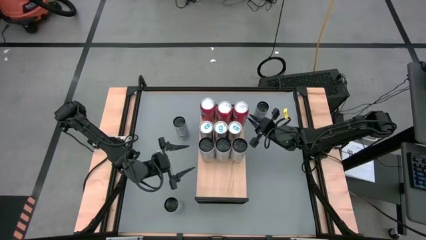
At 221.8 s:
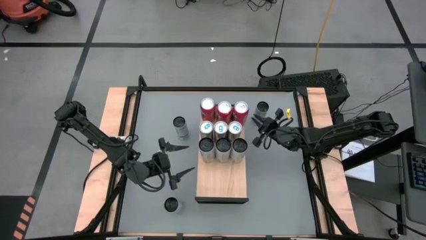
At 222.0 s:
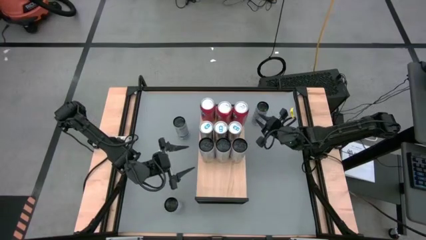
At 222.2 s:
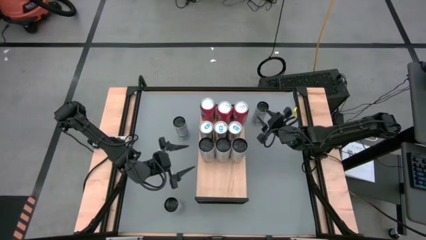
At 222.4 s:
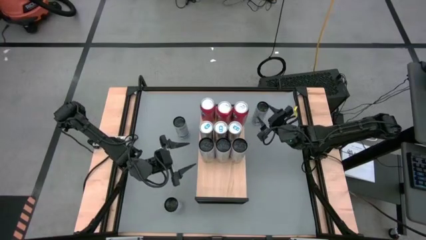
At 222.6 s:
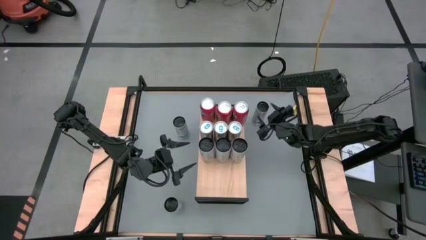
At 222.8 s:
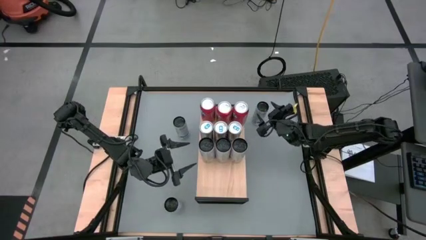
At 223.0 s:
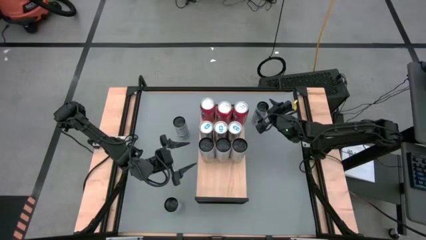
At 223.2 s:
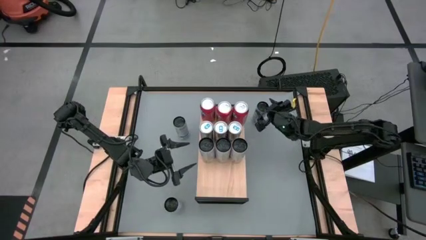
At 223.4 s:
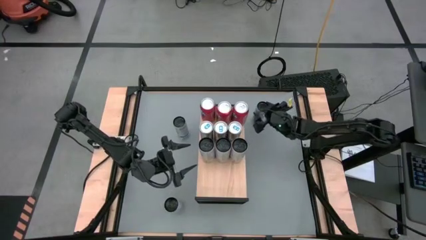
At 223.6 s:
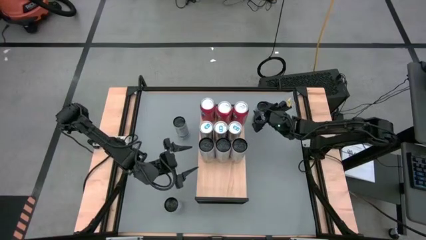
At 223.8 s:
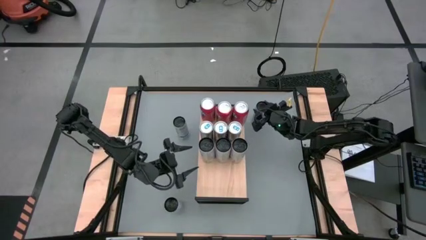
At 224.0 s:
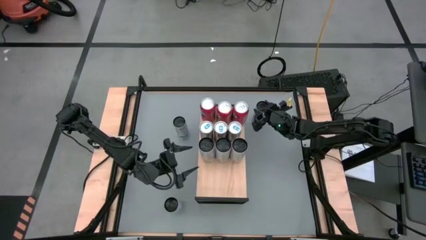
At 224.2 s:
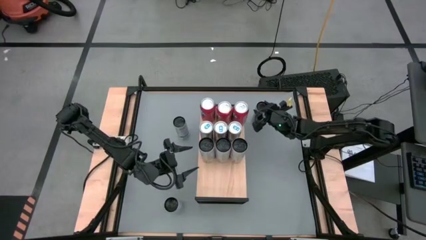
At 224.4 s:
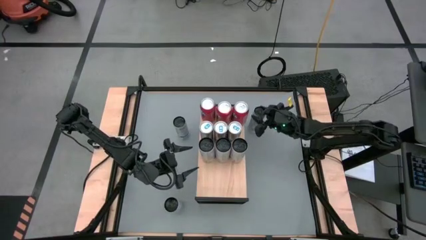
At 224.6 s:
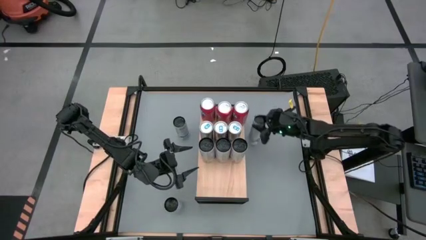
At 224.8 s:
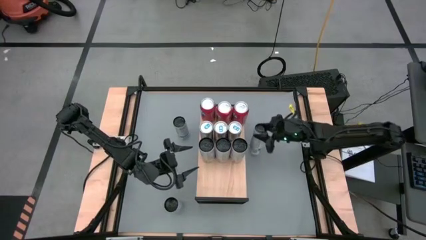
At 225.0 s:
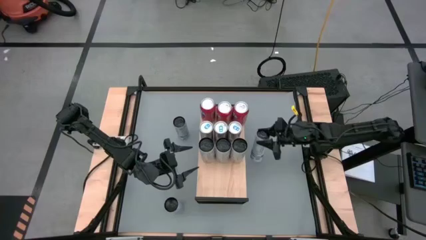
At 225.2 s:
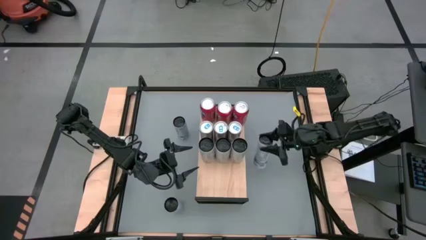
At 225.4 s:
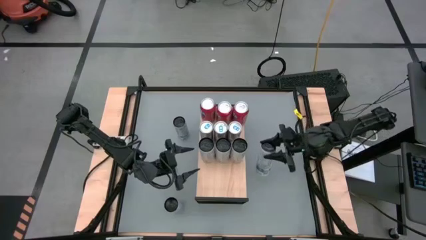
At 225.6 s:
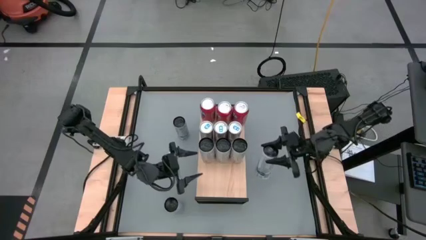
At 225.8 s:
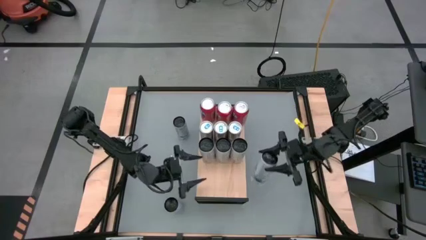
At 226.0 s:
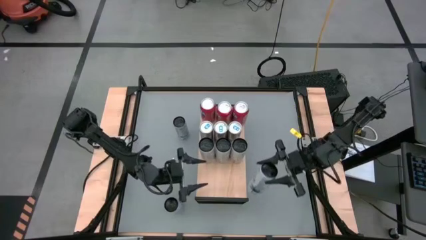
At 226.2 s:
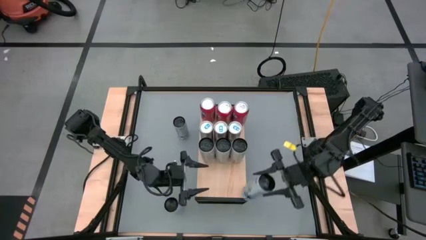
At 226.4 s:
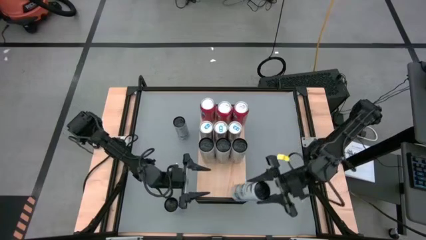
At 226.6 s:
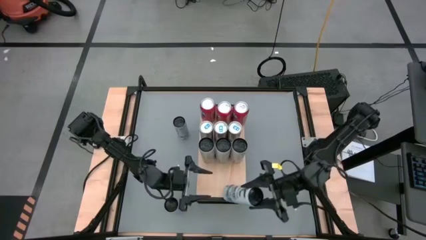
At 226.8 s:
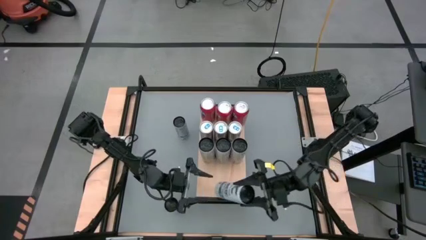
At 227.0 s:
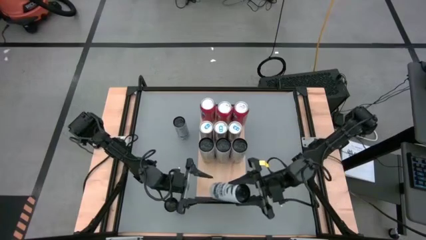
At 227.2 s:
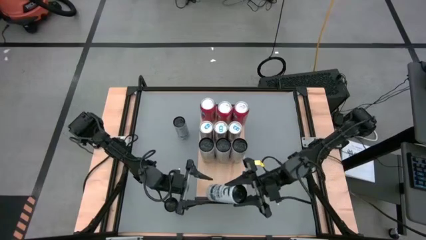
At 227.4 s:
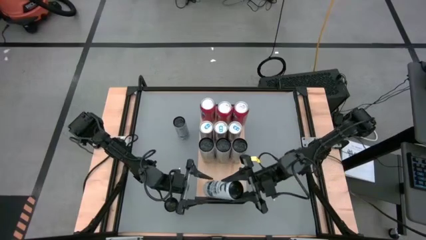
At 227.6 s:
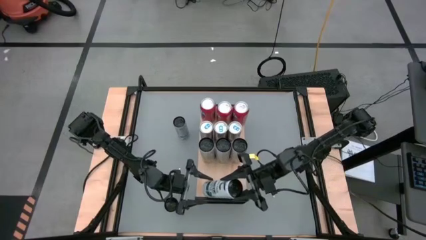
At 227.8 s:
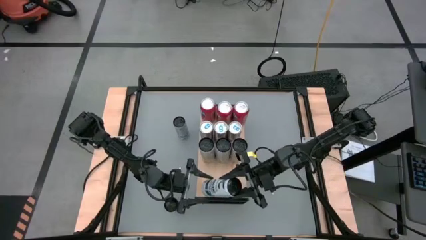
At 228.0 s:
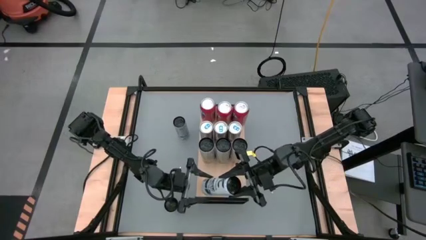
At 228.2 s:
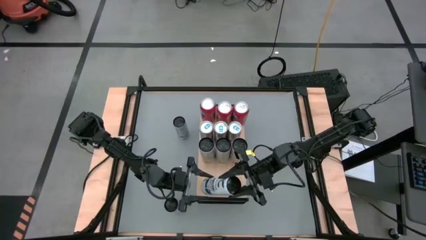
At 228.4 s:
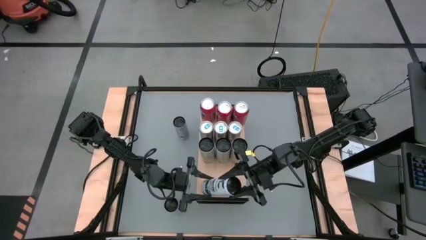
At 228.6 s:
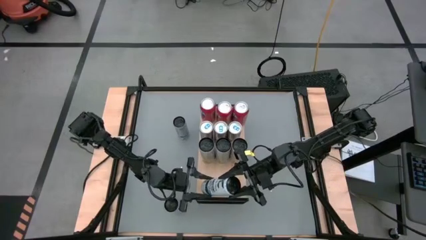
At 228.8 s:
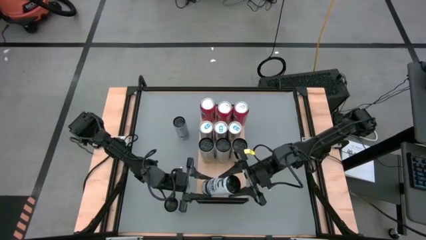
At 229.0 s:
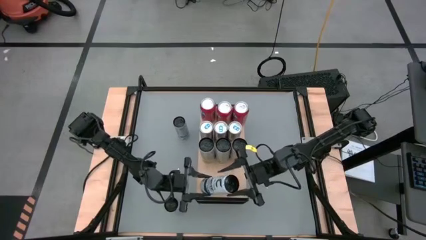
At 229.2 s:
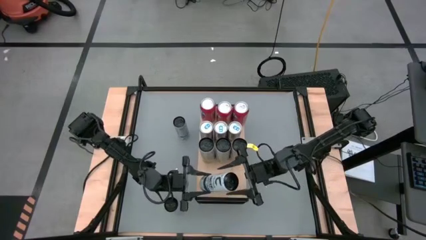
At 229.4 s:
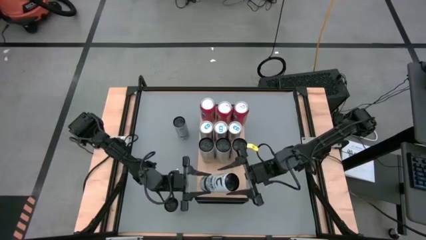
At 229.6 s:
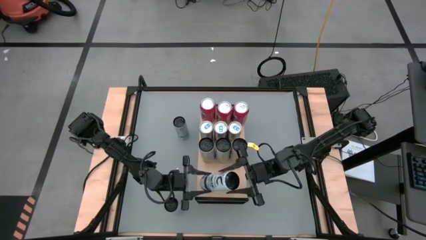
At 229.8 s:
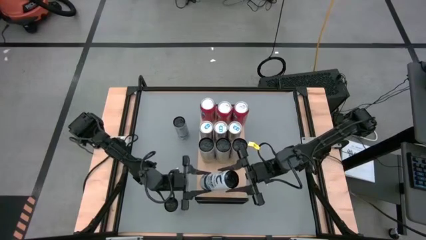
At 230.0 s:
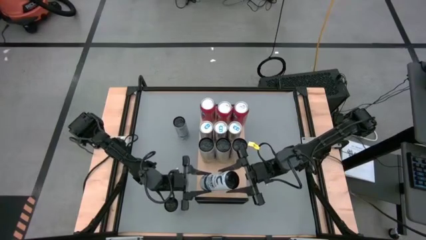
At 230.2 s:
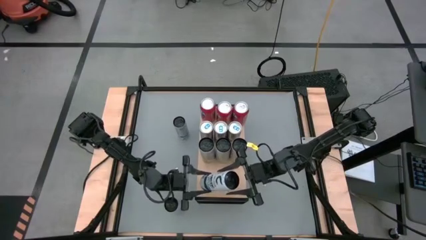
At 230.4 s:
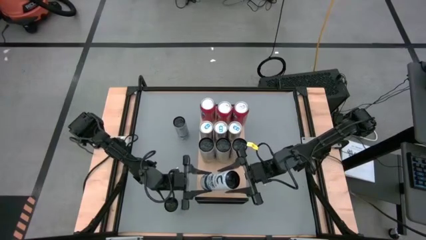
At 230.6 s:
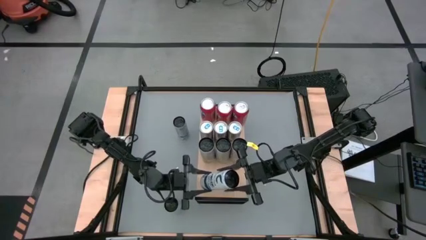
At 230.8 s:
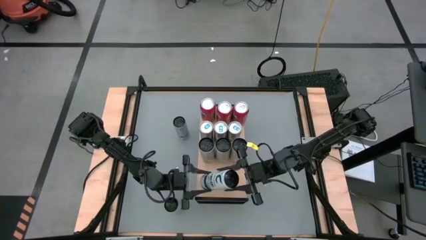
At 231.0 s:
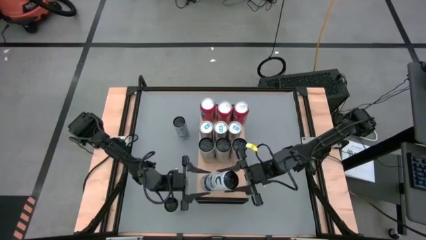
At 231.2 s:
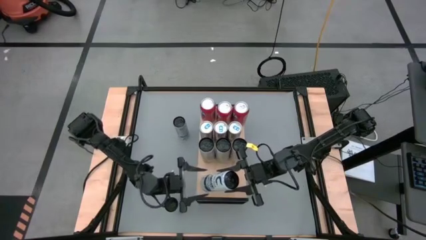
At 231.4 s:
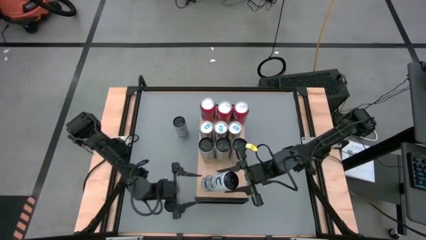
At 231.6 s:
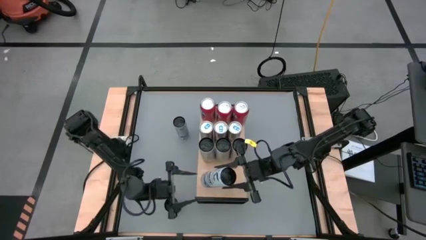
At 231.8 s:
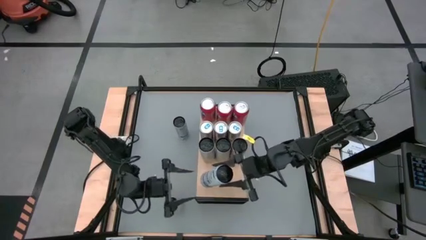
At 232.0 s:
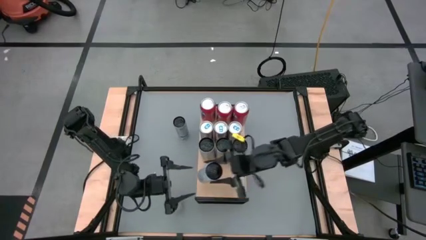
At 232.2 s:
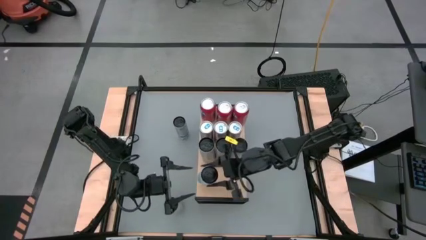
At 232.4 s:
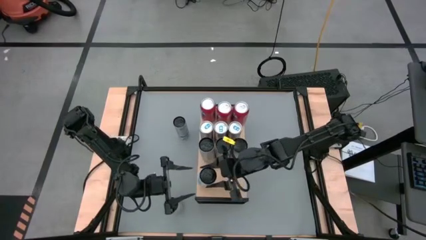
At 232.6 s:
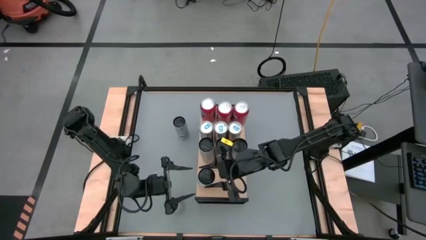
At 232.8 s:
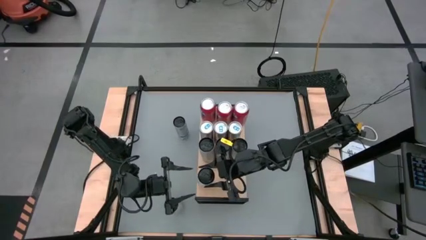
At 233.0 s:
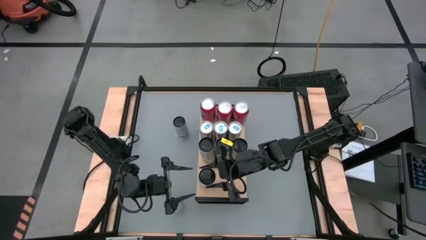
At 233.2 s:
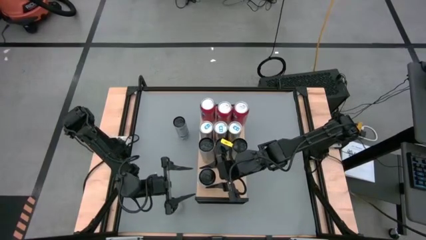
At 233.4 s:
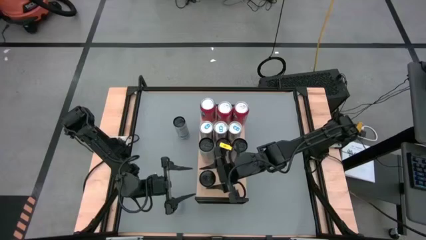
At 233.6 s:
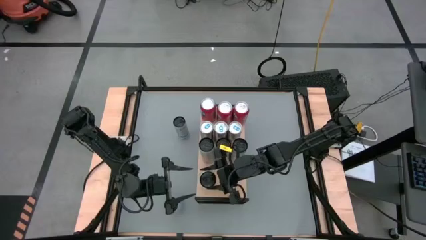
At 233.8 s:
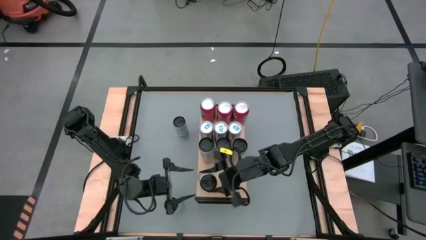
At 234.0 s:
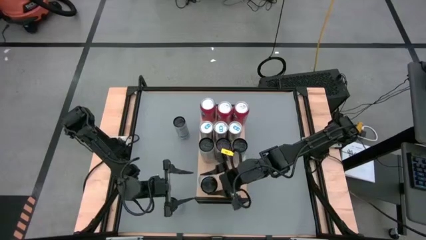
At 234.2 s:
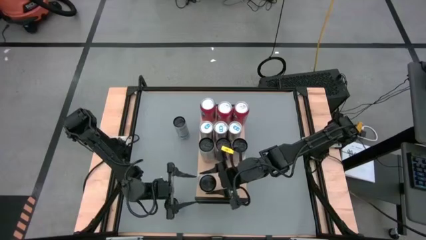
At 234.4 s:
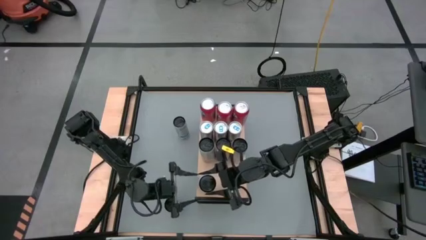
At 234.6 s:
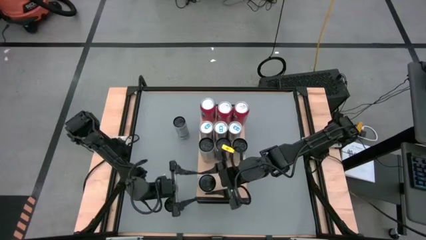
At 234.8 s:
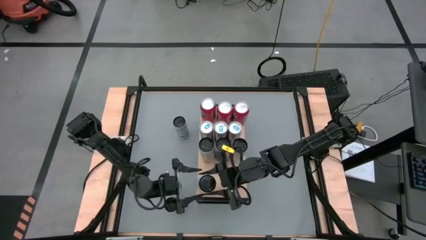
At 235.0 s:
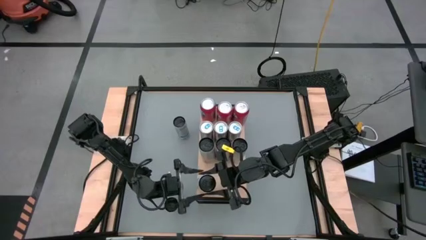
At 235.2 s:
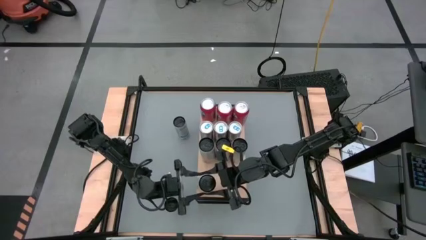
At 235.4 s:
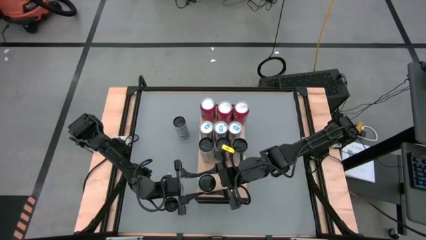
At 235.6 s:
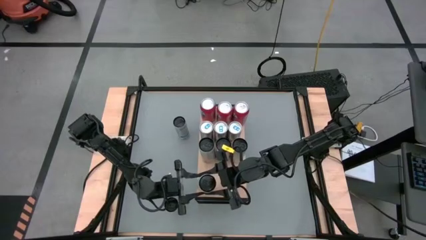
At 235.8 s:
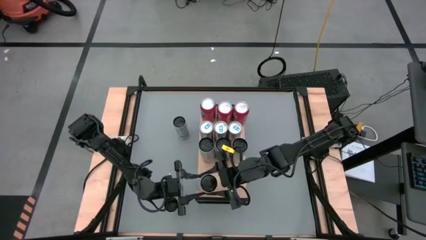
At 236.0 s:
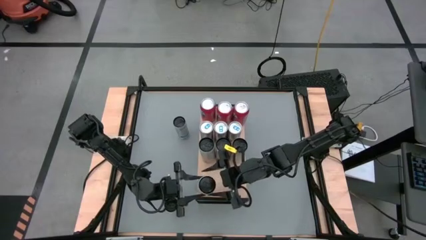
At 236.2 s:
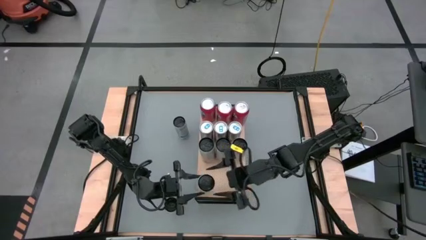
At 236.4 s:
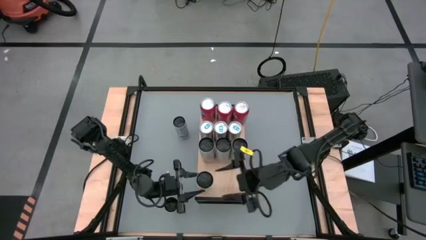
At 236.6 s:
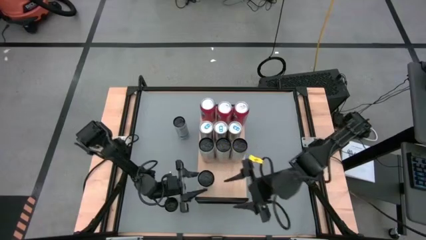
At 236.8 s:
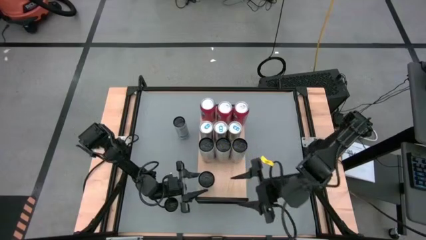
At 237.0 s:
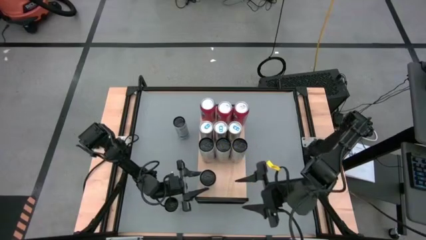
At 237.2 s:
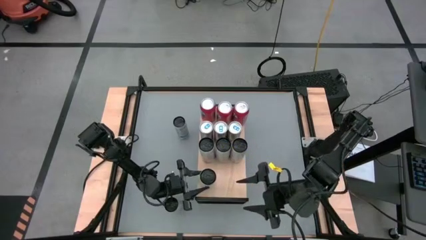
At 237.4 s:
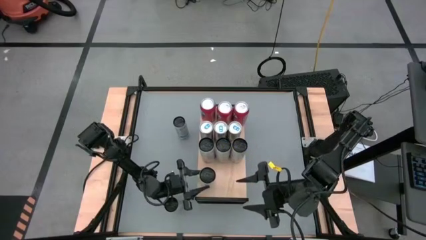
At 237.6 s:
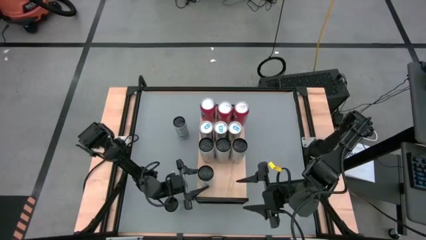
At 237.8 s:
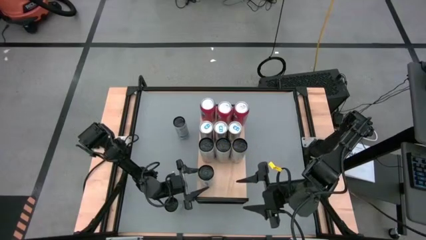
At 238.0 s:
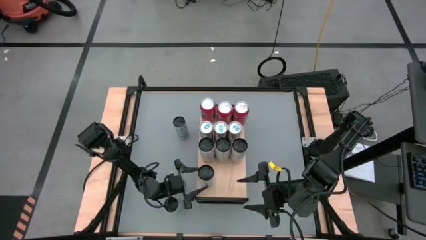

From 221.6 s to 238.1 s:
Task: Place canned beverage on shelf
Put the top right white soda can on the shelf aligned with the other white soda can
